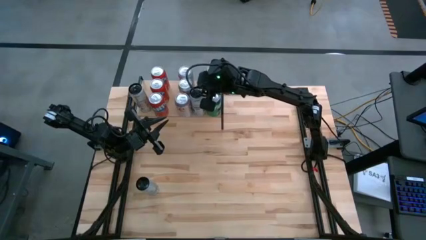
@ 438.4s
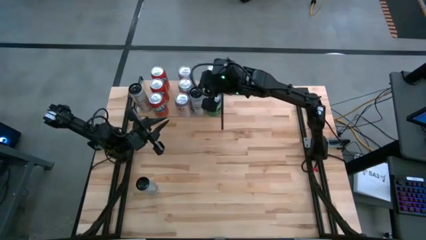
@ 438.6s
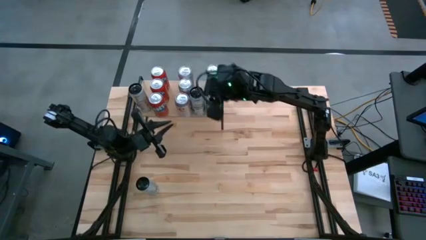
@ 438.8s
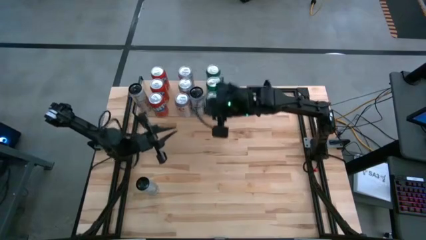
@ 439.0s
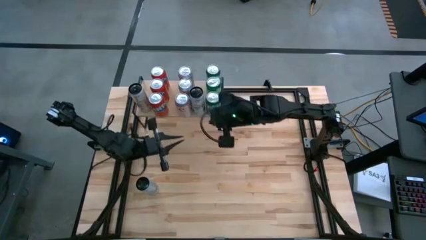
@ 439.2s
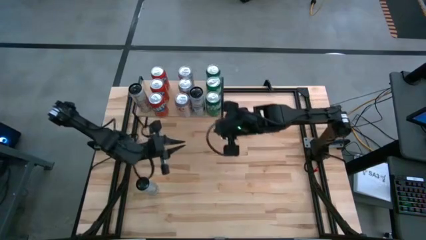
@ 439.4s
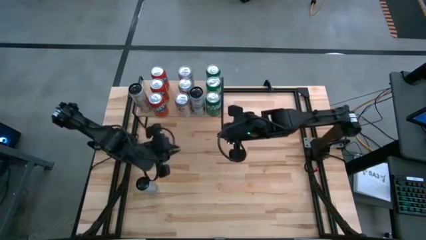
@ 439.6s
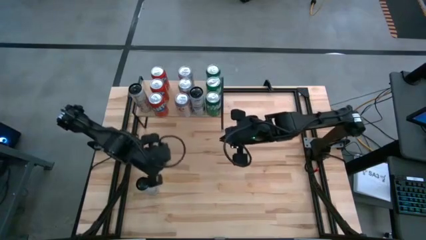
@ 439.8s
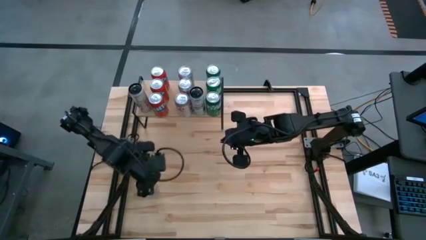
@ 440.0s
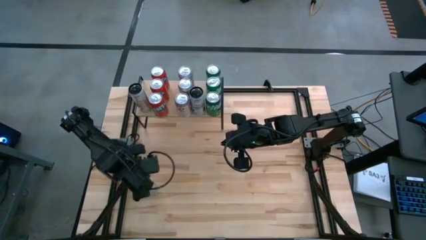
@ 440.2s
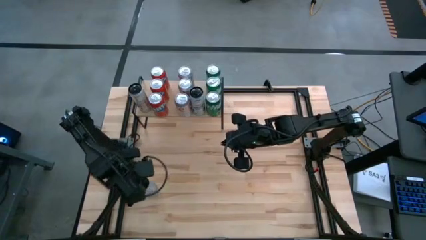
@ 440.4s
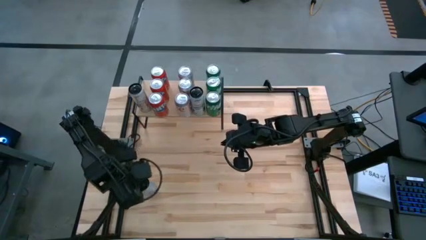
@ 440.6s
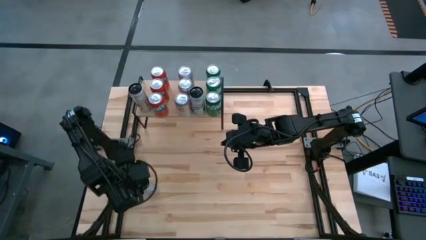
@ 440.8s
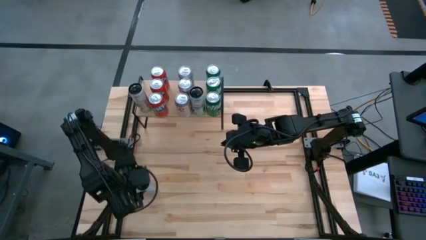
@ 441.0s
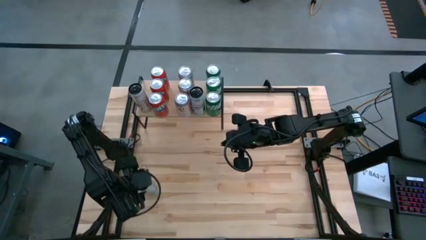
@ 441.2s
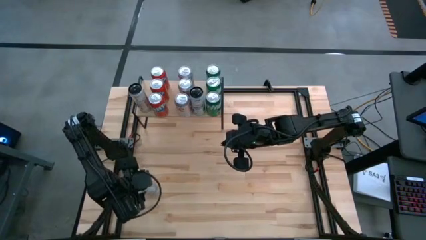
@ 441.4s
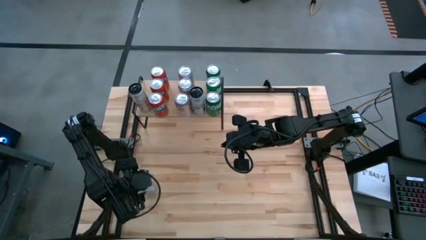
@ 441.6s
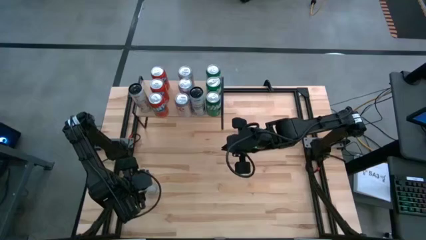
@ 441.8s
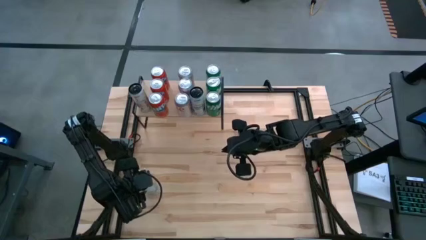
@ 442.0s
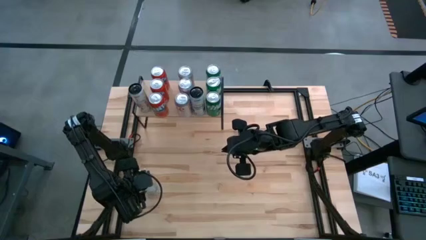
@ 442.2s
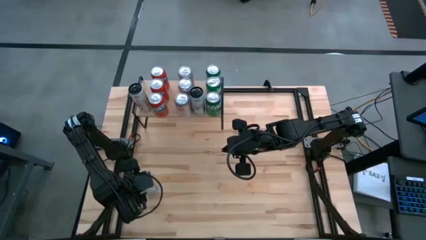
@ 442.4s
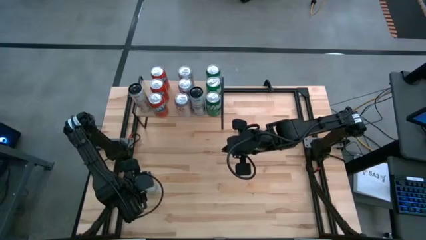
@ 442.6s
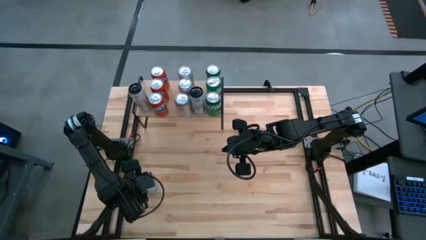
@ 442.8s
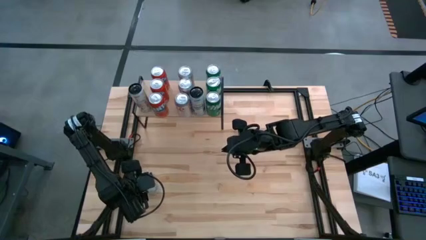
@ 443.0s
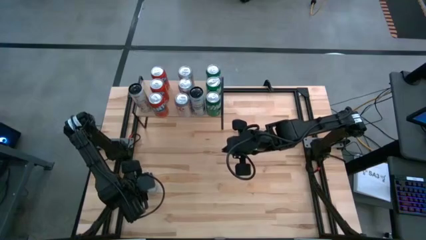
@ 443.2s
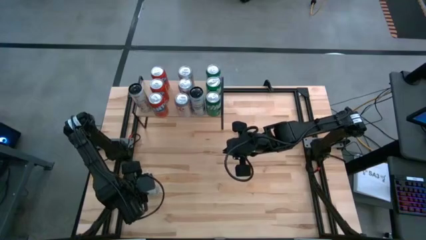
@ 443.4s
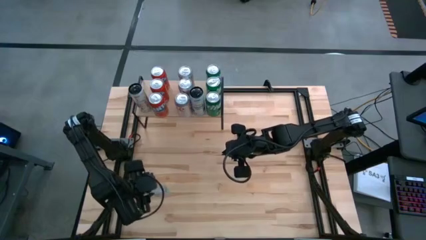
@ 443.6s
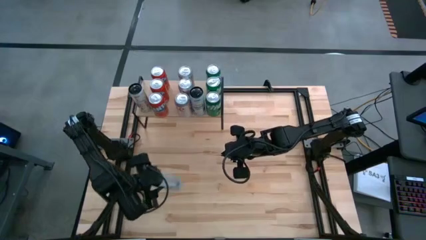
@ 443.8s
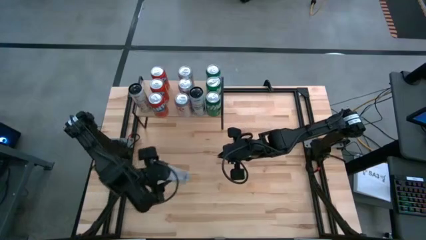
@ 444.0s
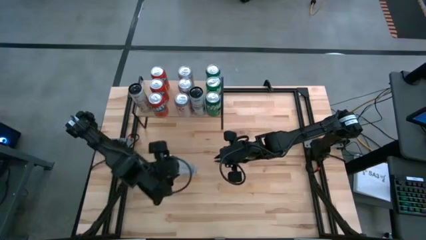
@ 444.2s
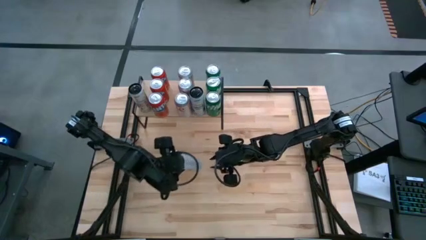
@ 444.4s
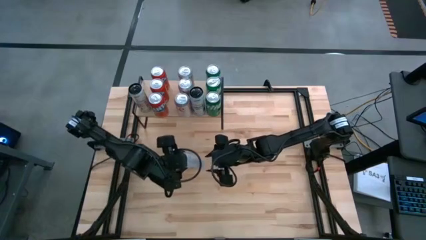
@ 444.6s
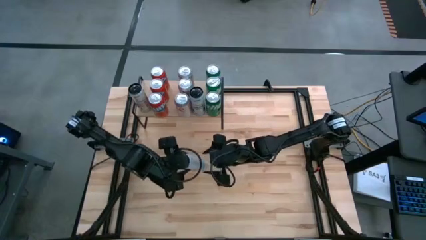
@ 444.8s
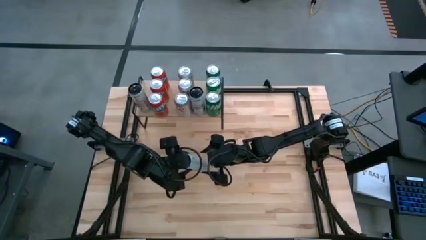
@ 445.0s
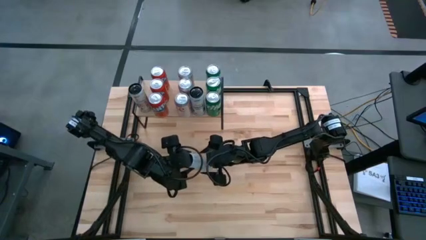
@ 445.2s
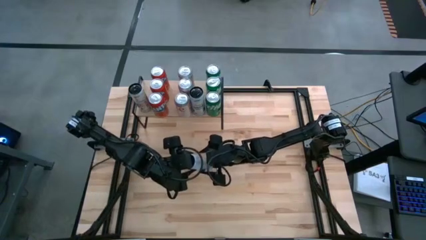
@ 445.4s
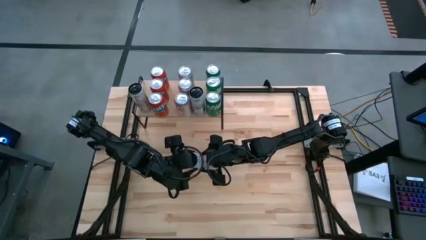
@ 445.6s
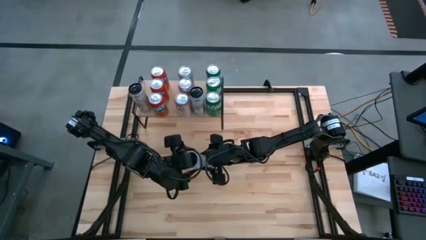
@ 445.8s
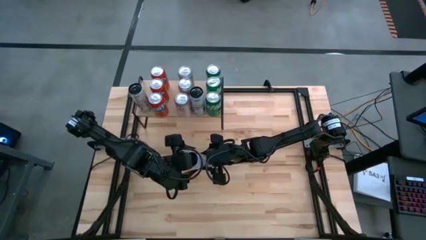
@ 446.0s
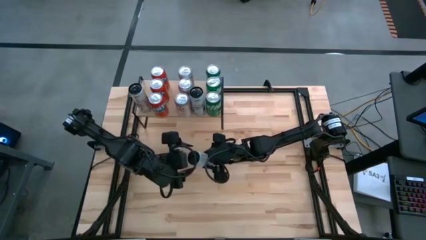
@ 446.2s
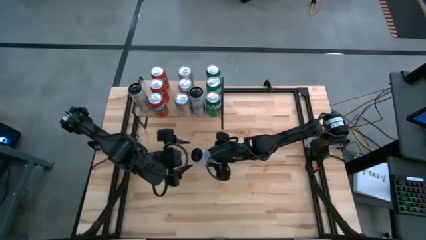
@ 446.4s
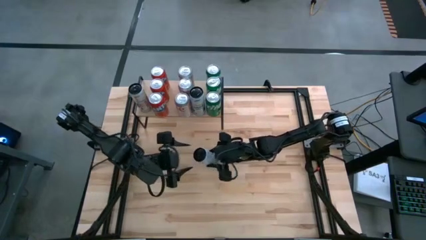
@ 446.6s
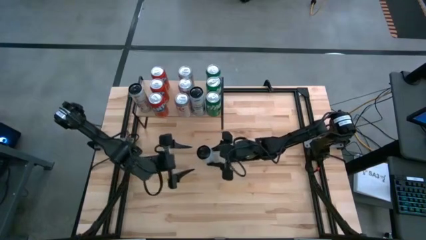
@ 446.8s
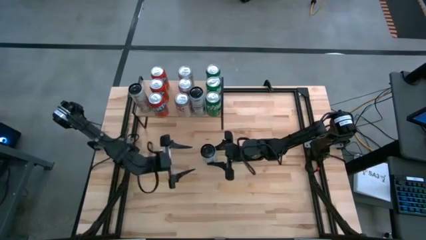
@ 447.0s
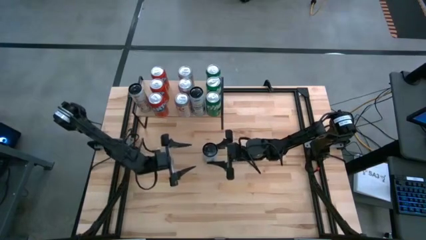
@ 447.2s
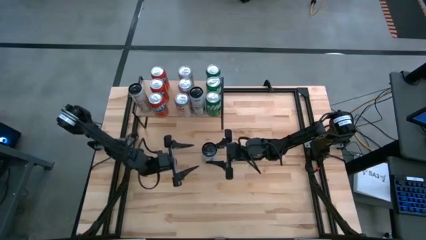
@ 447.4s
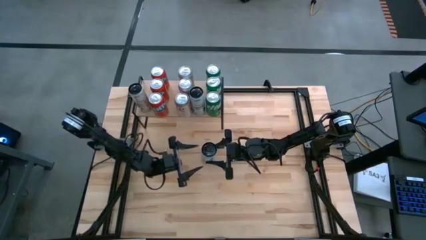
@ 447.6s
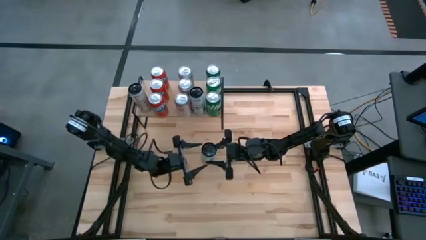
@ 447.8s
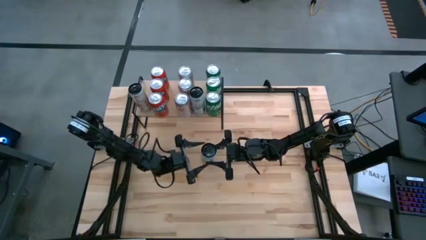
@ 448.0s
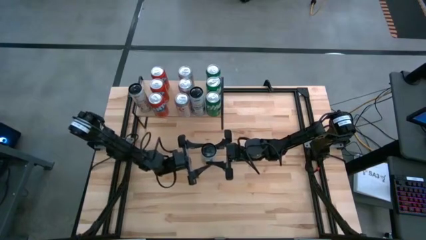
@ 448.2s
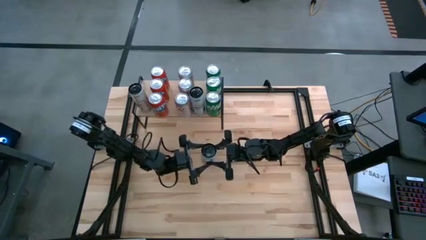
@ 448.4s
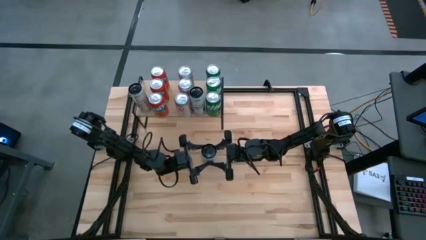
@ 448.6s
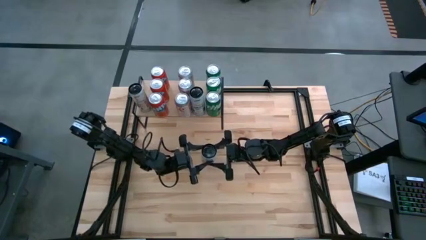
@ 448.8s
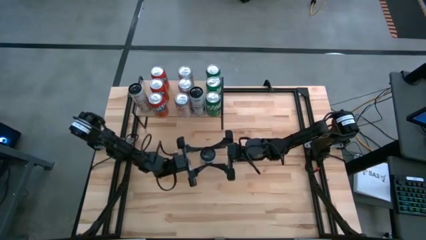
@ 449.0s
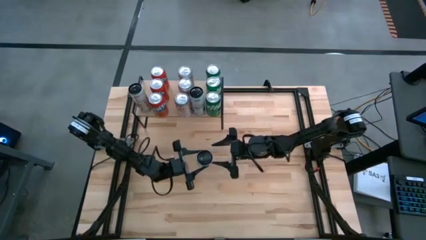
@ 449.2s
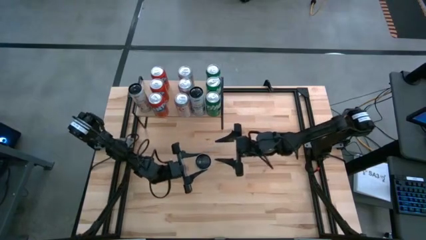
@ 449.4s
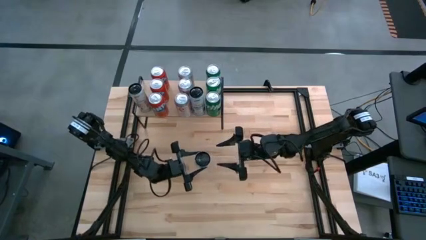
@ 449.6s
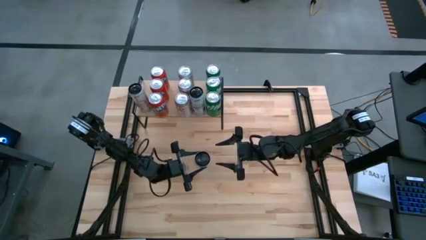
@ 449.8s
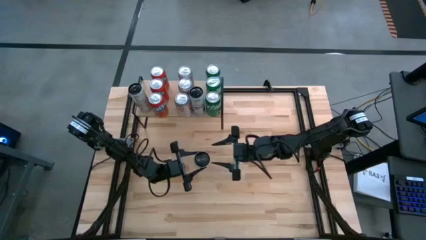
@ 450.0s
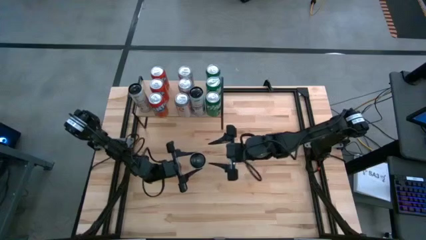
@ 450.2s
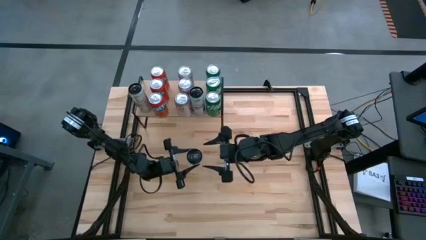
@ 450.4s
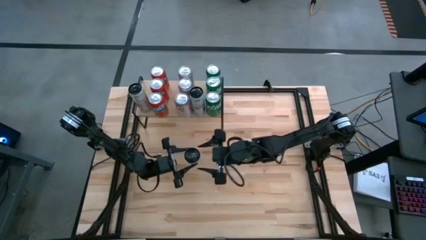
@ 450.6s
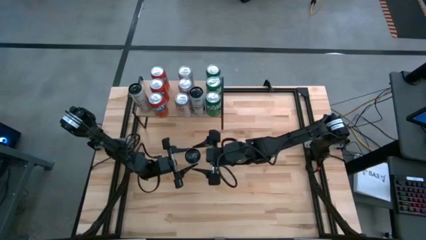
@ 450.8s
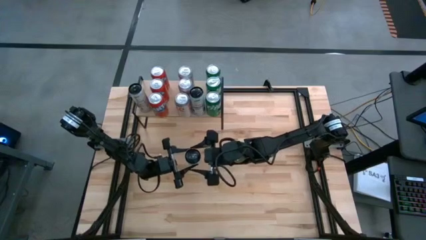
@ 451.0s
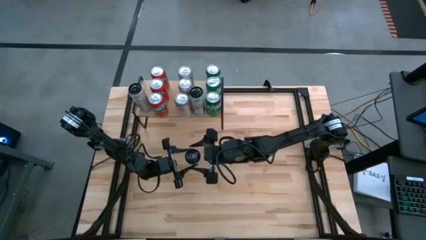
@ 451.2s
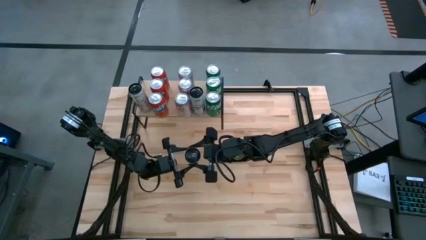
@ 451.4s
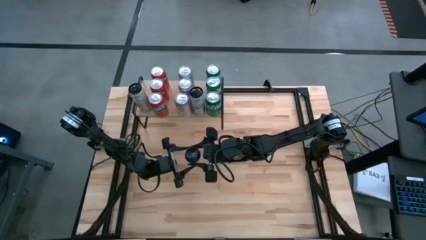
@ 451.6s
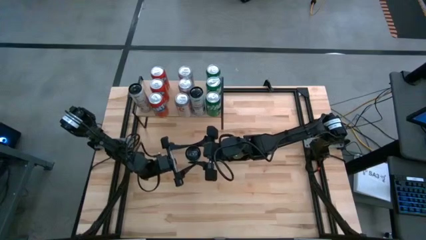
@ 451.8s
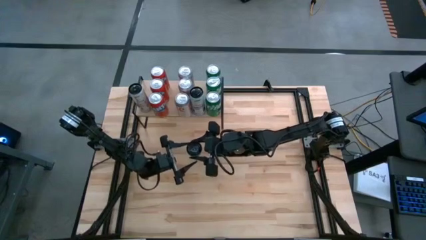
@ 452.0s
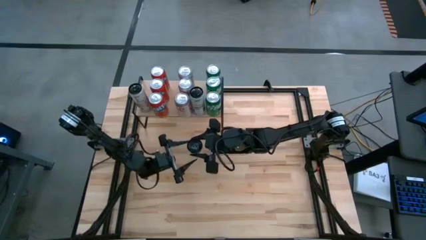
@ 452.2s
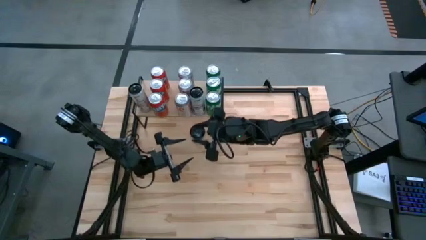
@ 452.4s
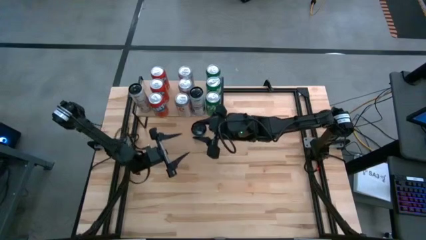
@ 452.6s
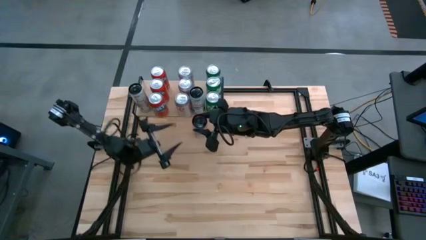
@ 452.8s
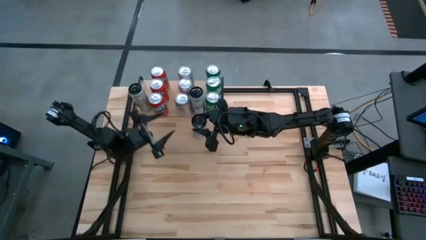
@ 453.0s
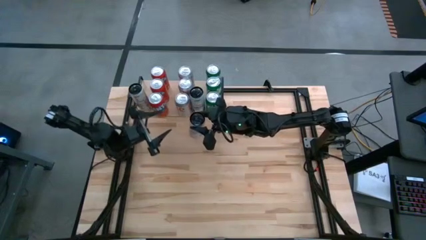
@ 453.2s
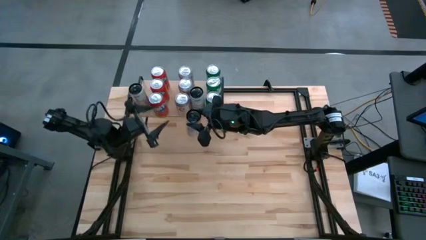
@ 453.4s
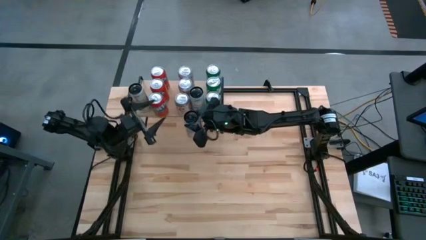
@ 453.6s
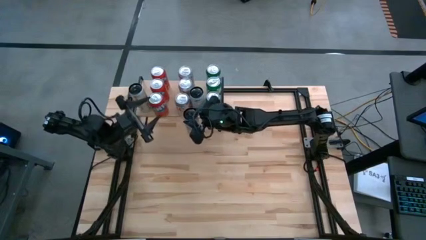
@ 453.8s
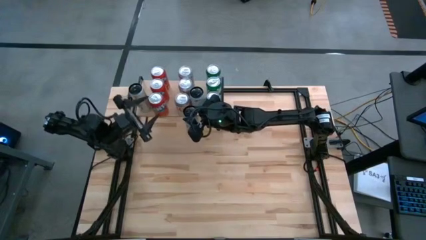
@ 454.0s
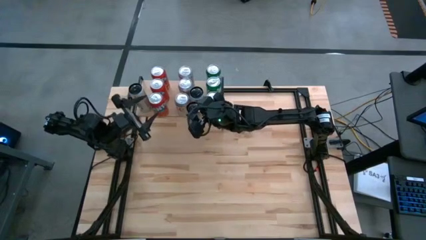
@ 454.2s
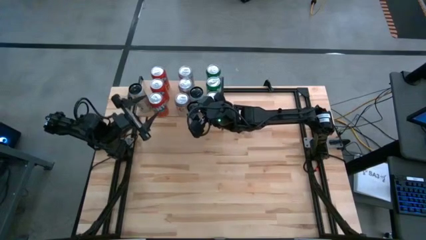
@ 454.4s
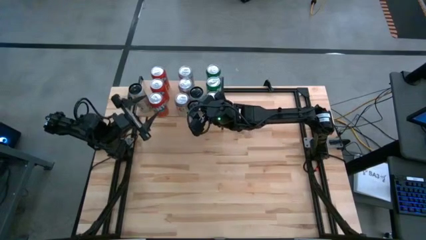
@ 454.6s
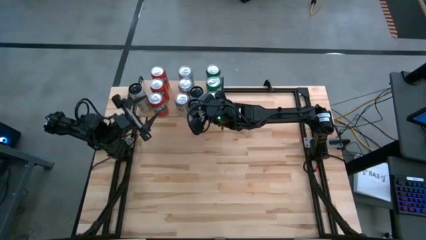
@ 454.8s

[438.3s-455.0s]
Task: Place canned beverage on shelf
Put the white and blue soda can aligned with the other white and blue soda can on the shelf
